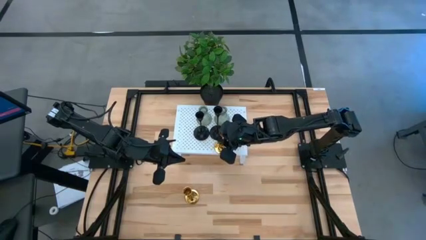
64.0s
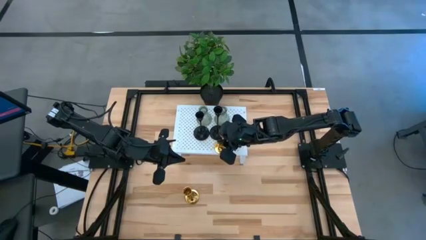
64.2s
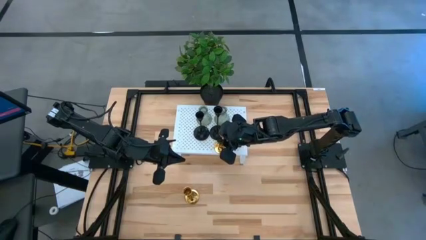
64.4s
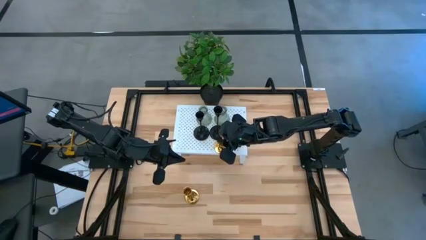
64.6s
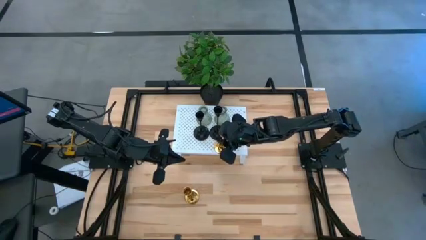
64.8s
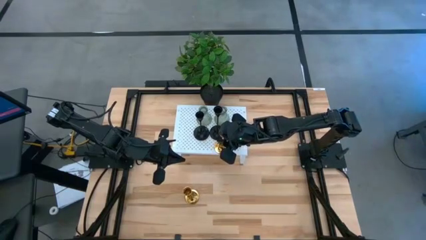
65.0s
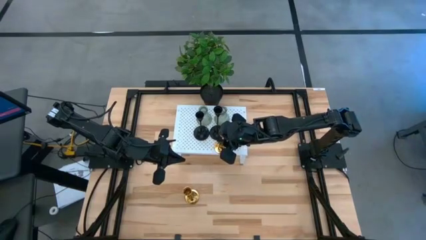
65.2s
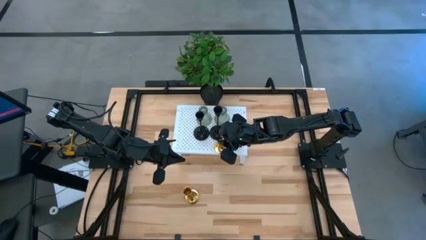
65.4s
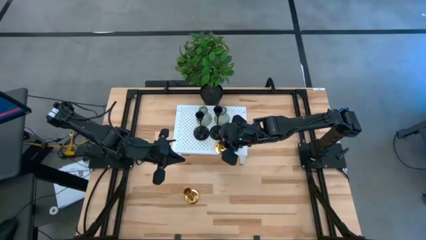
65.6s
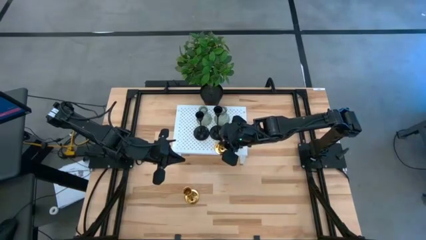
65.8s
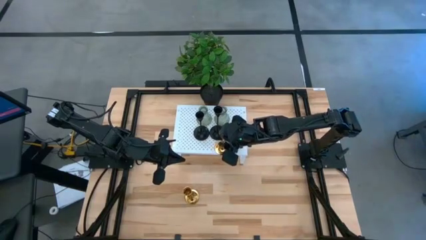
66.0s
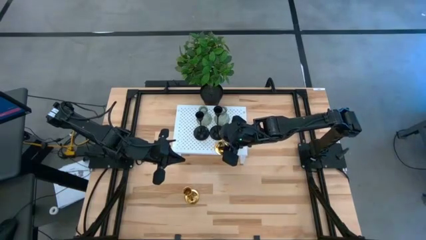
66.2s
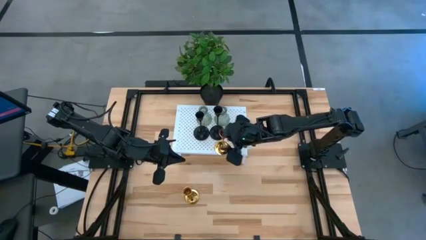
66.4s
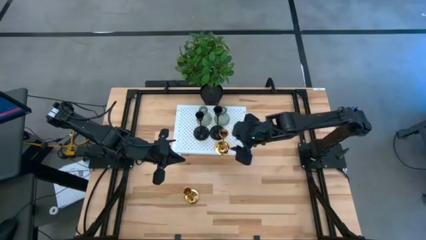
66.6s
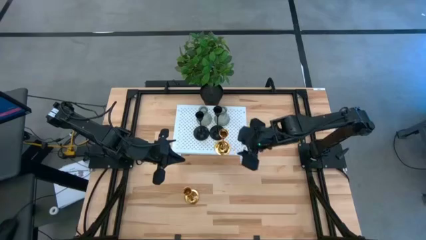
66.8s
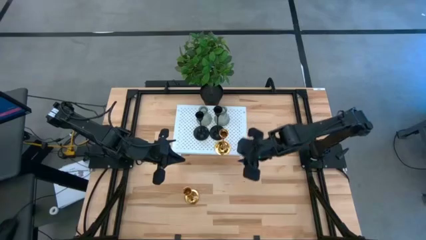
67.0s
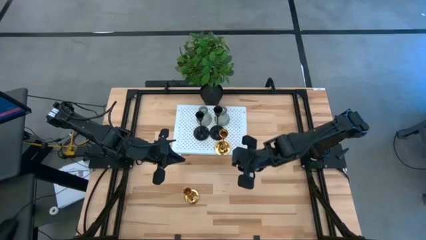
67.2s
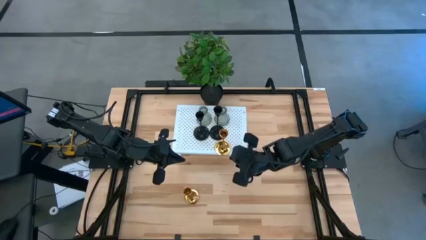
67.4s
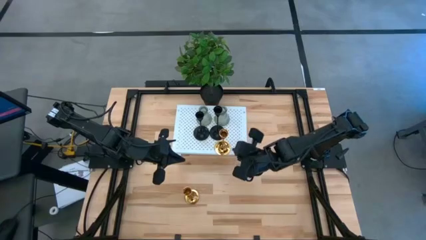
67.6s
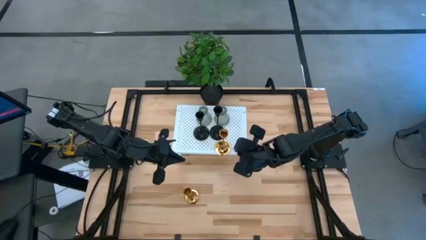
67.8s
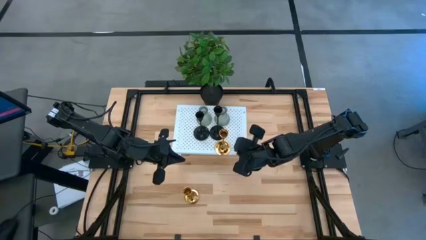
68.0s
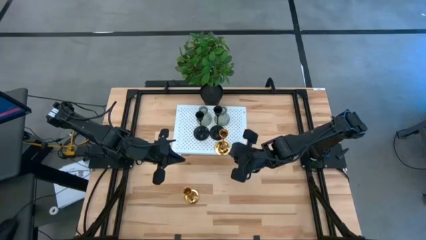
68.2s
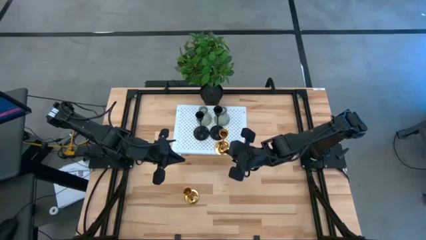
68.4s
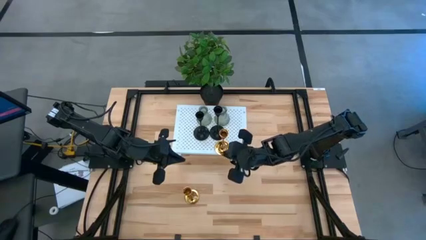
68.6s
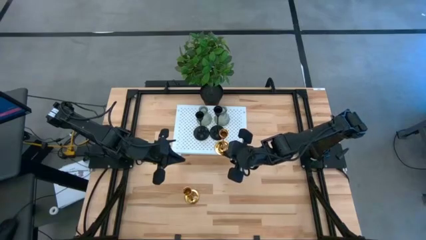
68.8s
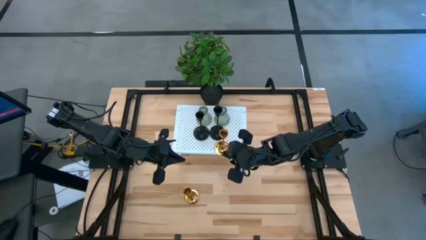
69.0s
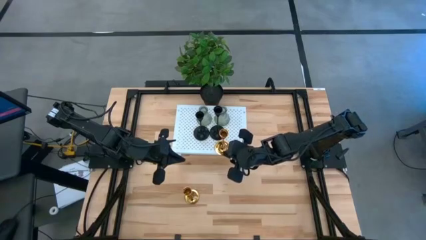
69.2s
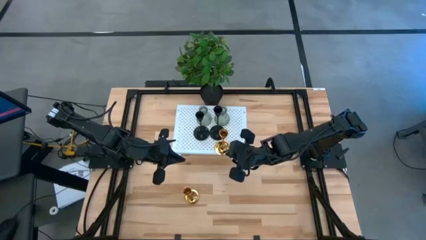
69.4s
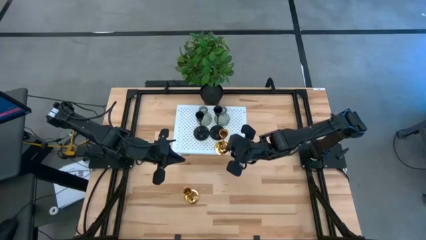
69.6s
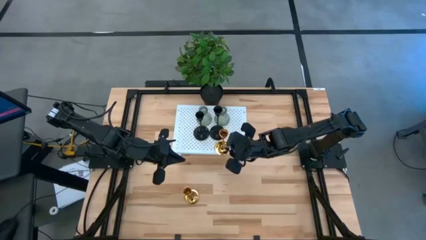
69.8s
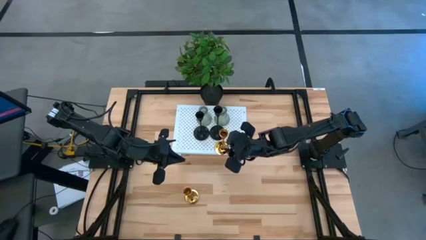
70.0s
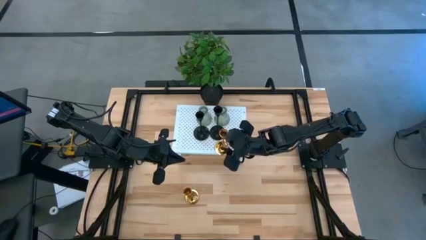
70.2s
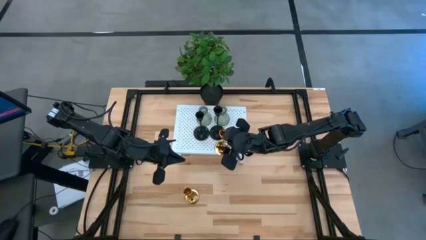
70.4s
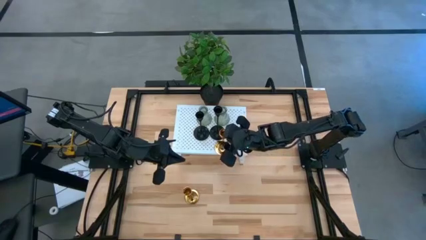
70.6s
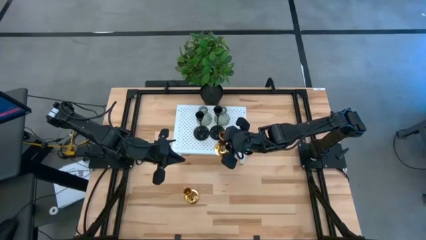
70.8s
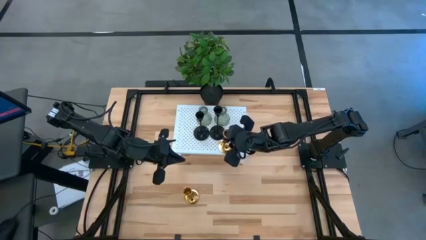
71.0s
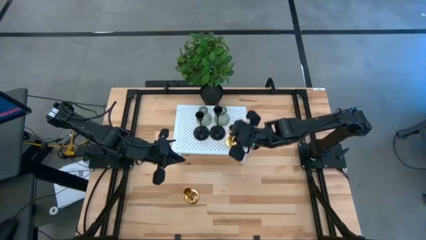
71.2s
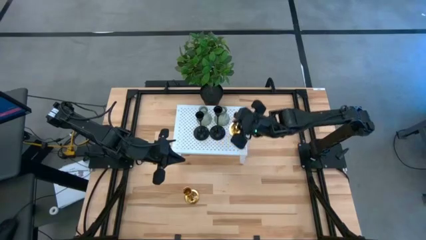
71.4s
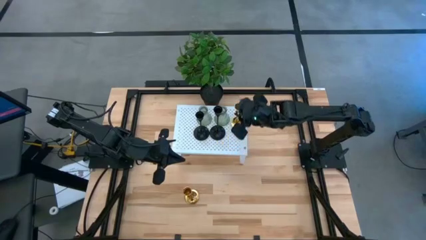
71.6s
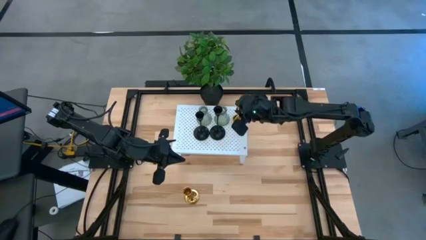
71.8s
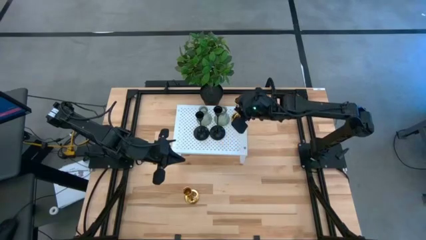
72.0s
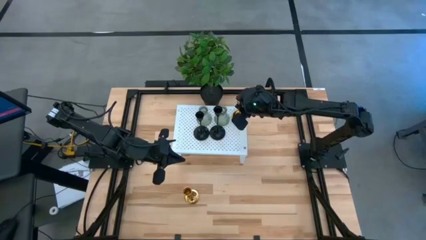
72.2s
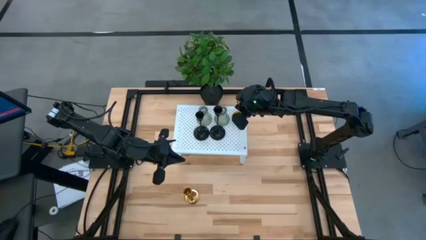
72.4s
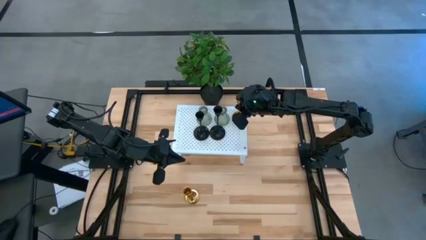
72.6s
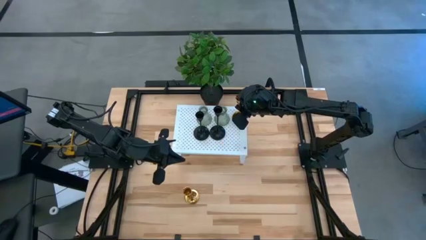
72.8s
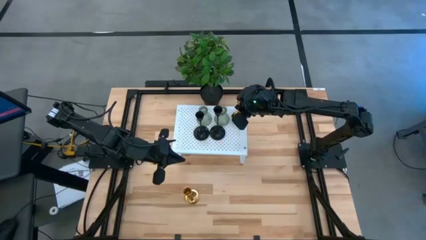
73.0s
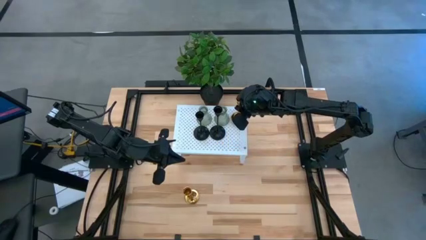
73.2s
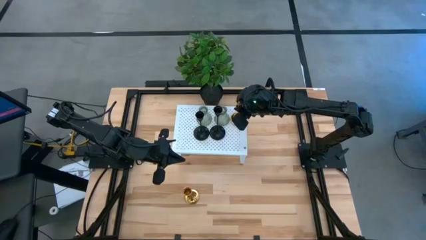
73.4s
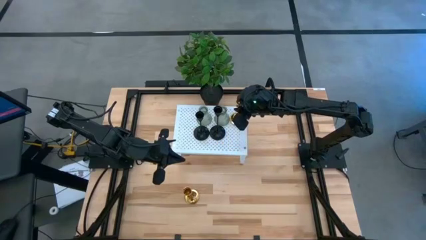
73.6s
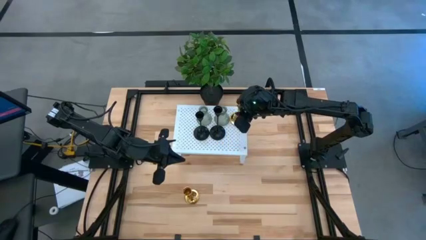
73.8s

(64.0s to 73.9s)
Task: Pick & Place candle stick holders
Put the right gold candle holder on the shelf

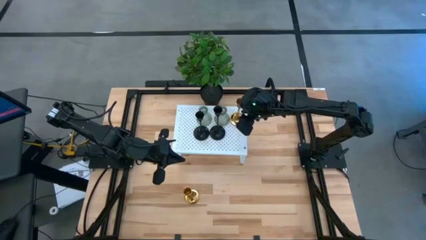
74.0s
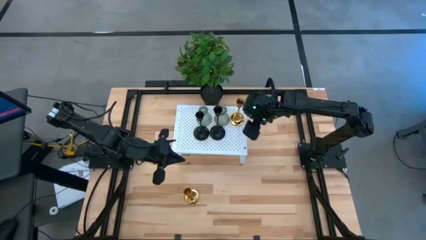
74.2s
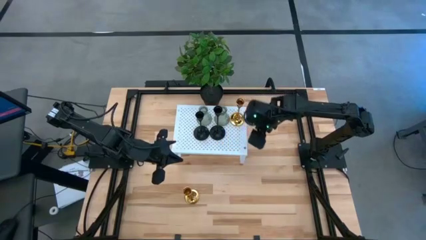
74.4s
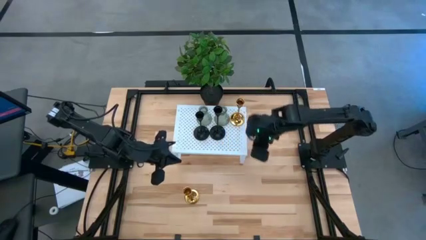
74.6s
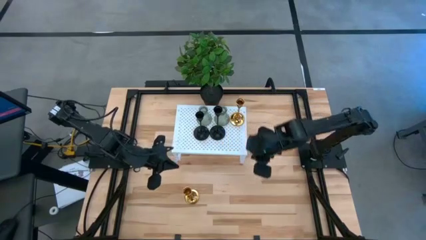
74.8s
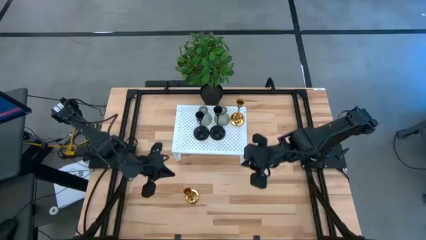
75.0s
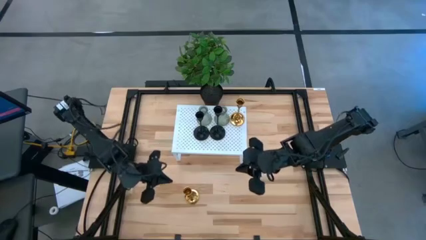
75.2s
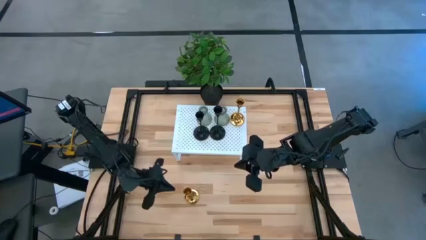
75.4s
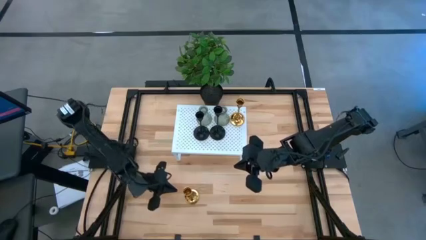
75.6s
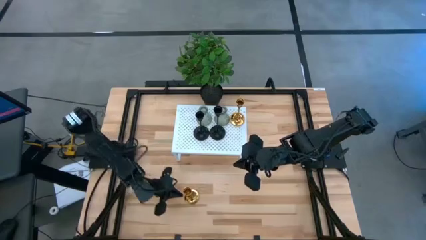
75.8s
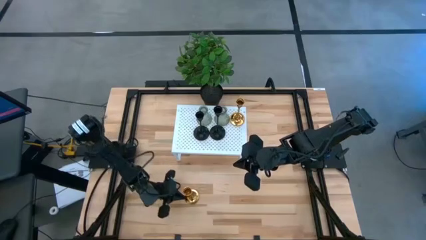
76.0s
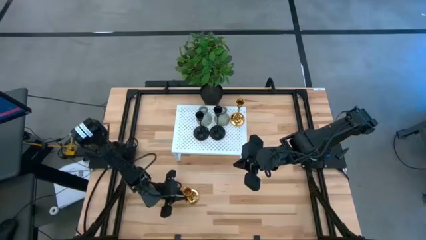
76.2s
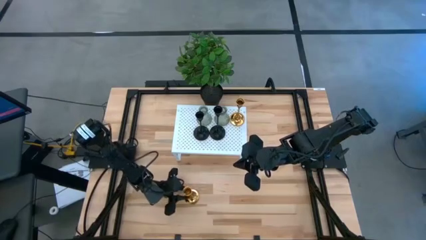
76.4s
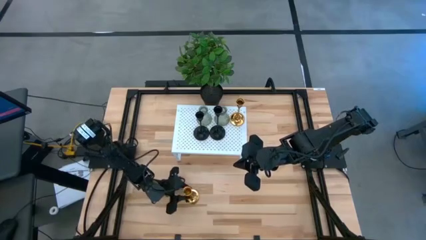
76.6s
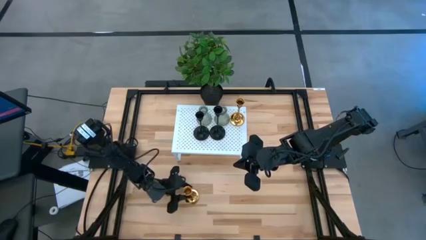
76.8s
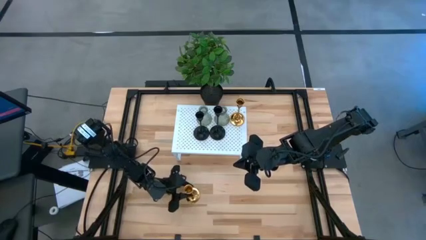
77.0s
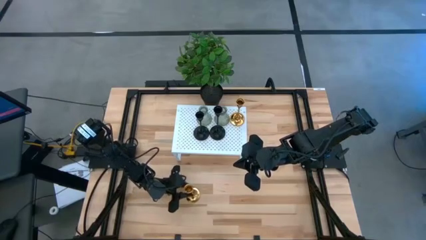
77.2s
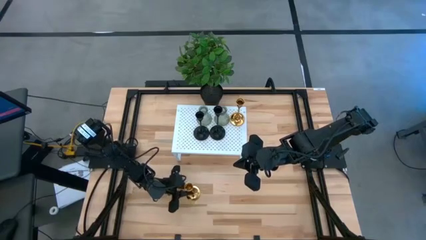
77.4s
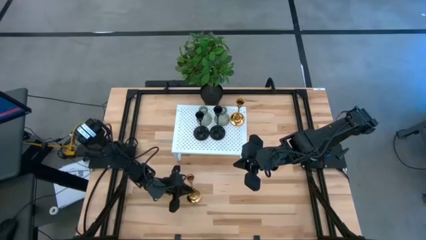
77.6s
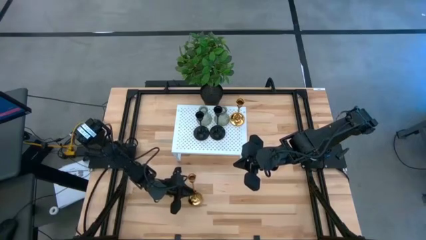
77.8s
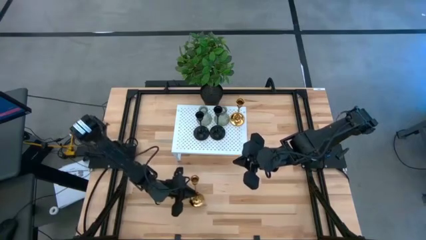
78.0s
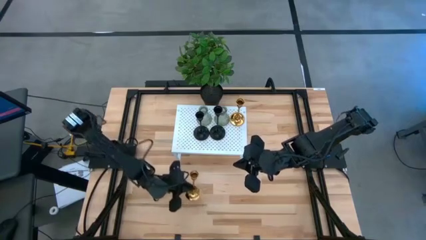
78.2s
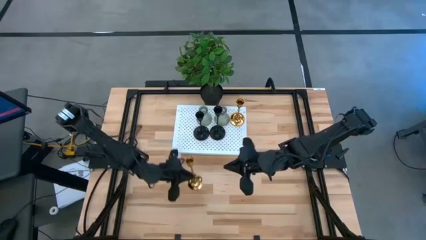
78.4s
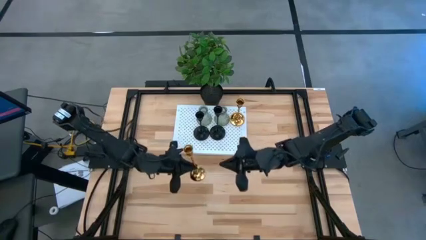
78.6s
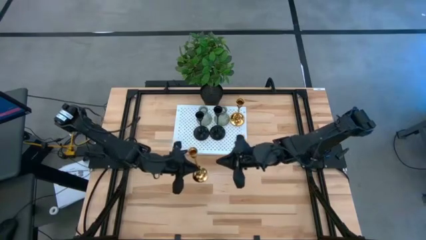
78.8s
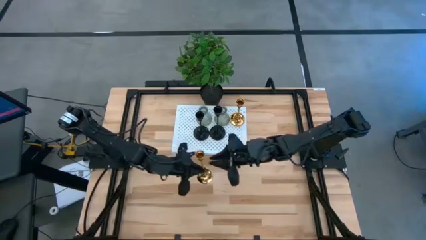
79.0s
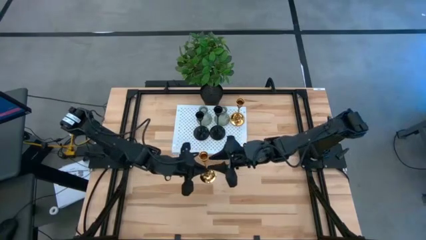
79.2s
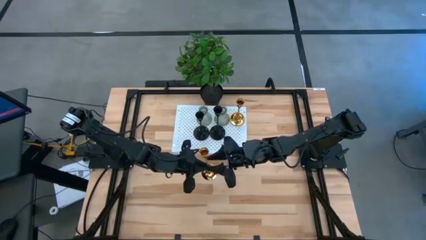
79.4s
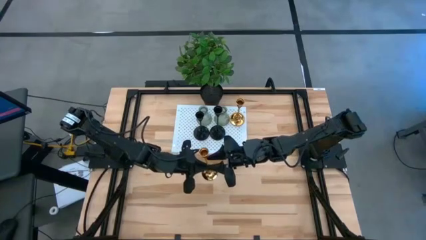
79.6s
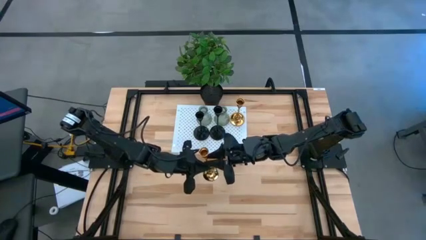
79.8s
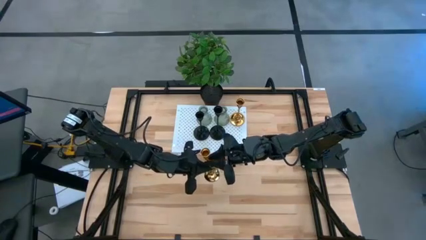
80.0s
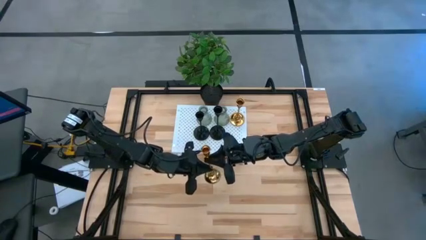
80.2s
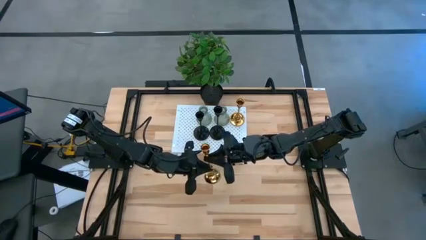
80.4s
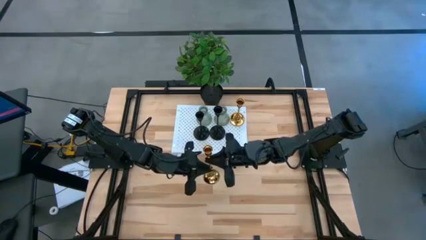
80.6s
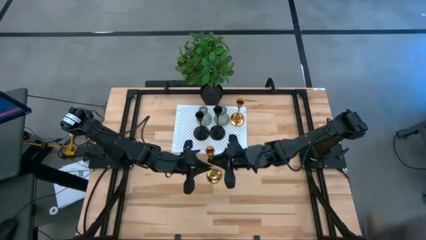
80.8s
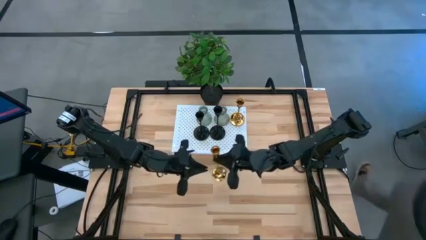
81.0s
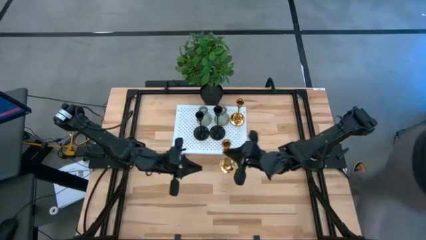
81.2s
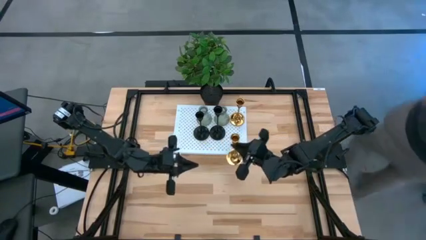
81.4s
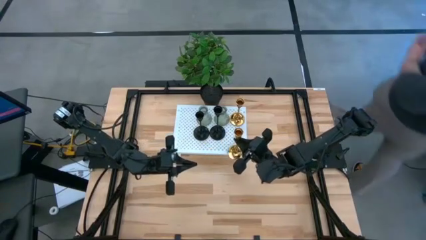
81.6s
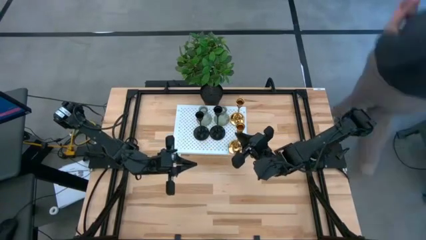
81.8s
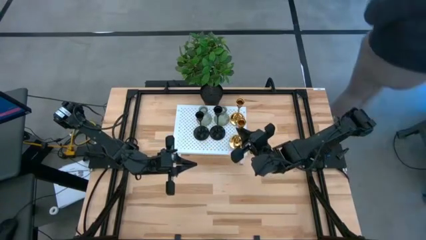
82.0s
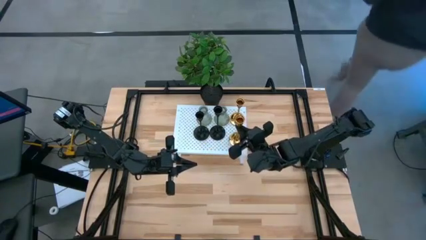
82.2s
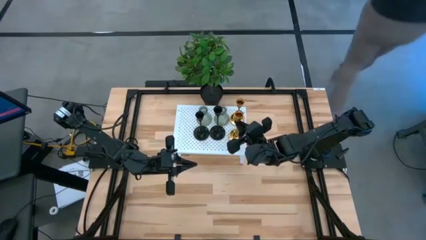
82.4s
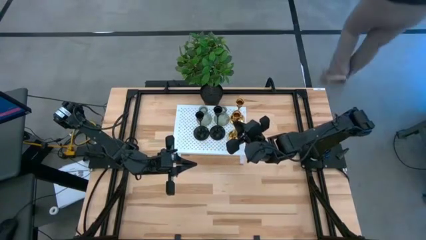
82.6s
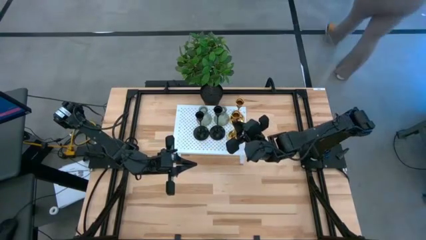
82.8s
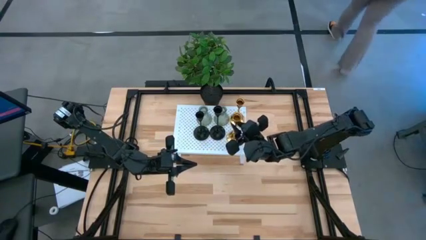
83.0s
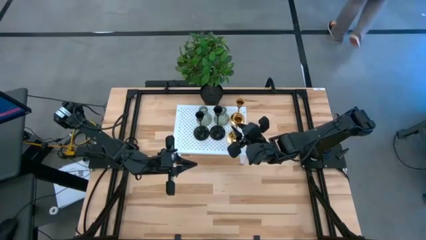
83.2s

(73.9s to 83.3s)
Put the gold candle holder on the shelf
